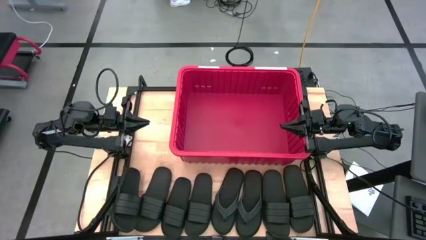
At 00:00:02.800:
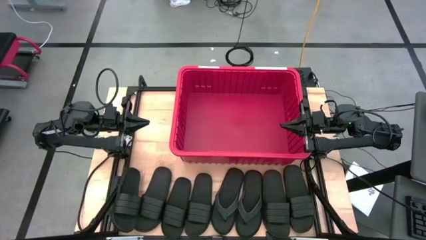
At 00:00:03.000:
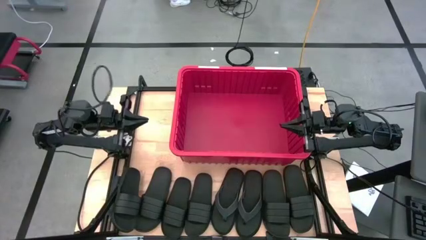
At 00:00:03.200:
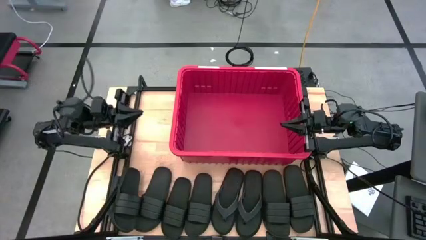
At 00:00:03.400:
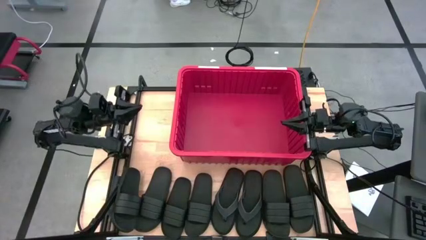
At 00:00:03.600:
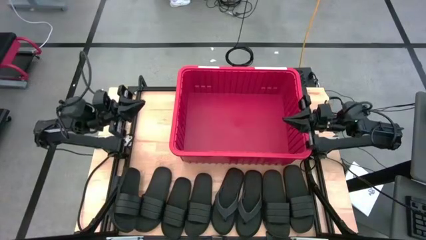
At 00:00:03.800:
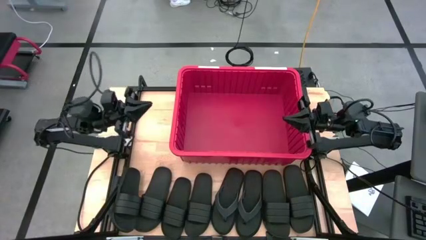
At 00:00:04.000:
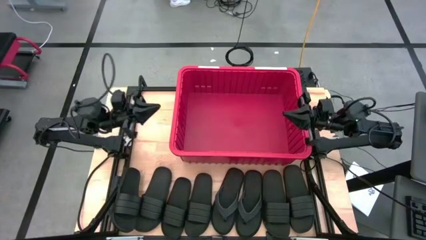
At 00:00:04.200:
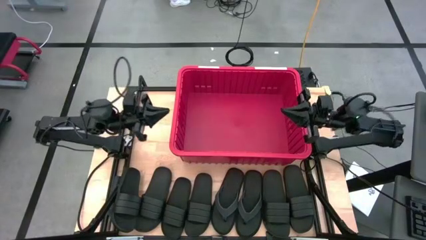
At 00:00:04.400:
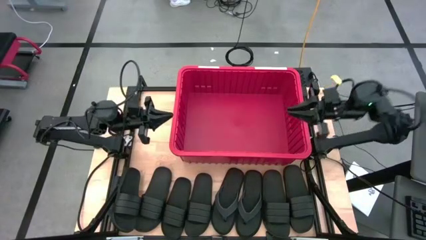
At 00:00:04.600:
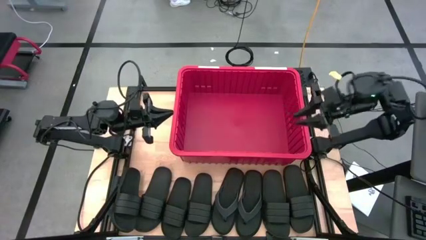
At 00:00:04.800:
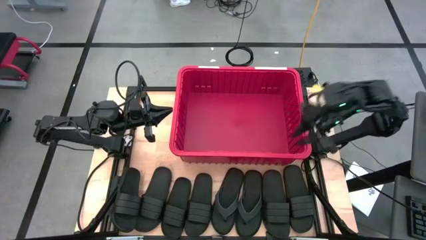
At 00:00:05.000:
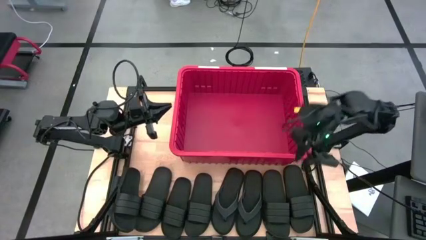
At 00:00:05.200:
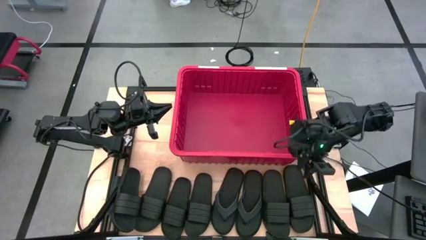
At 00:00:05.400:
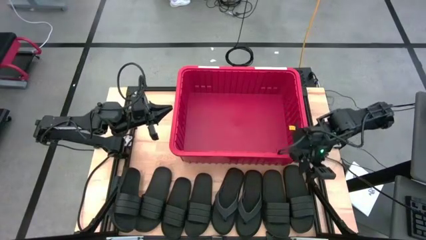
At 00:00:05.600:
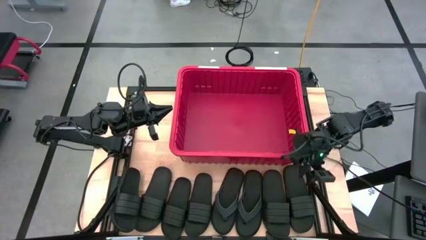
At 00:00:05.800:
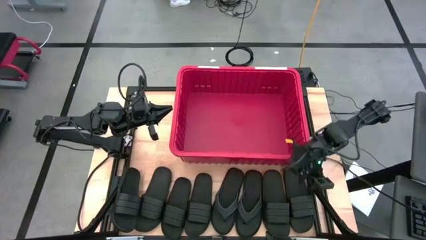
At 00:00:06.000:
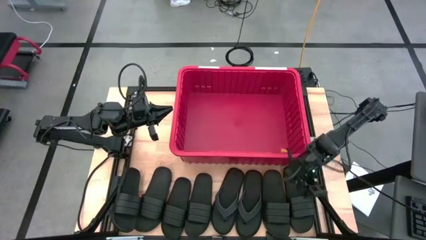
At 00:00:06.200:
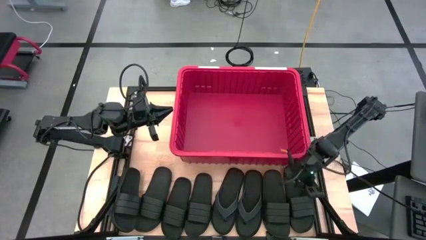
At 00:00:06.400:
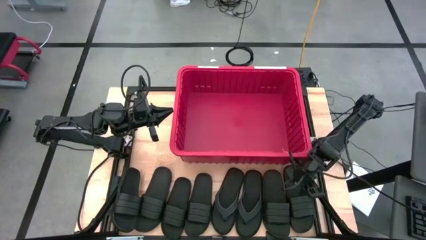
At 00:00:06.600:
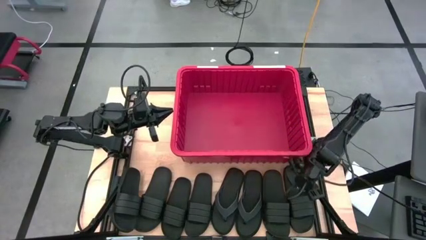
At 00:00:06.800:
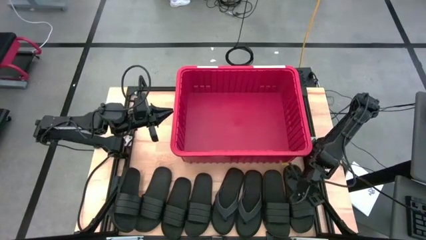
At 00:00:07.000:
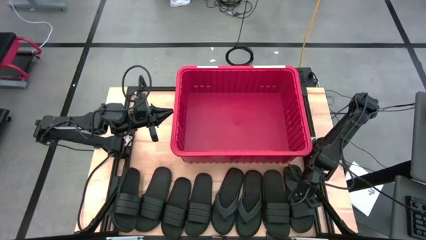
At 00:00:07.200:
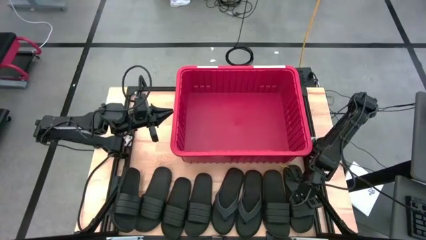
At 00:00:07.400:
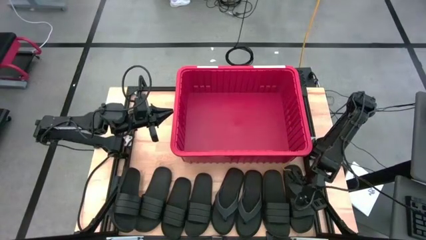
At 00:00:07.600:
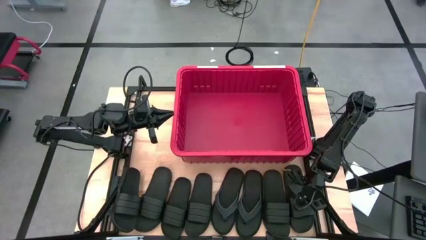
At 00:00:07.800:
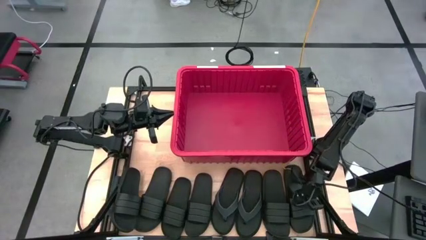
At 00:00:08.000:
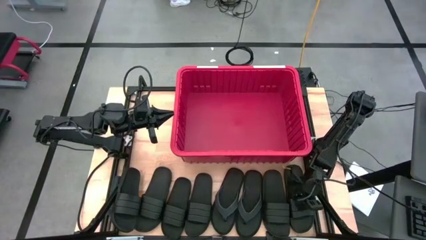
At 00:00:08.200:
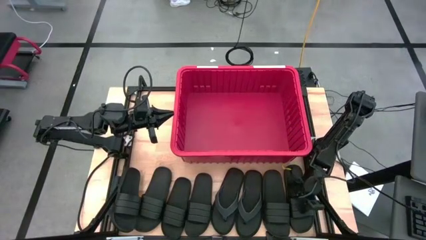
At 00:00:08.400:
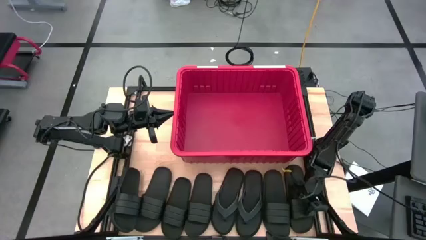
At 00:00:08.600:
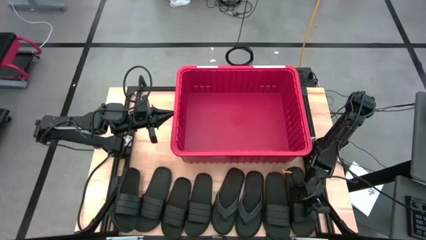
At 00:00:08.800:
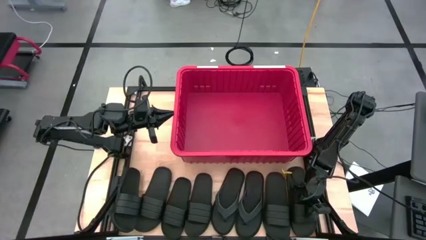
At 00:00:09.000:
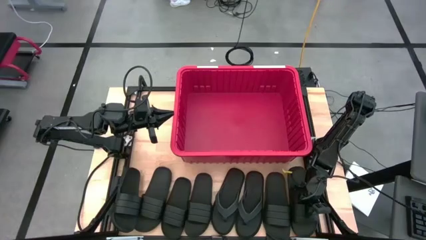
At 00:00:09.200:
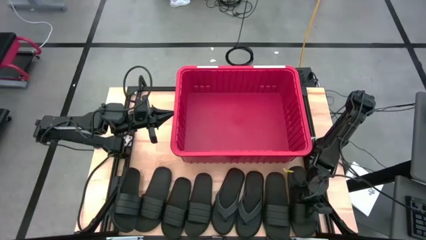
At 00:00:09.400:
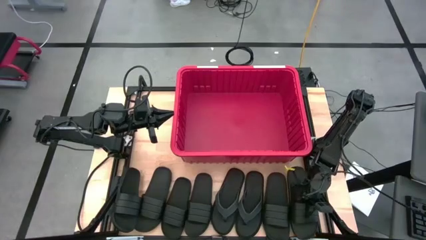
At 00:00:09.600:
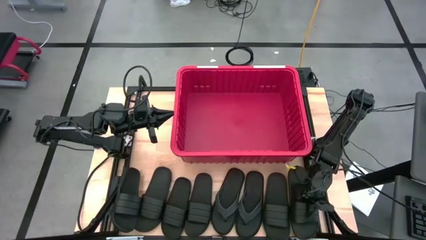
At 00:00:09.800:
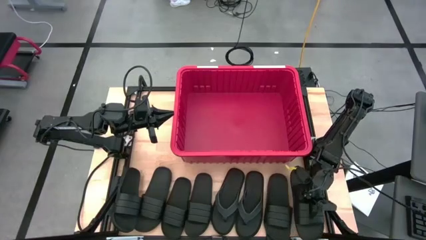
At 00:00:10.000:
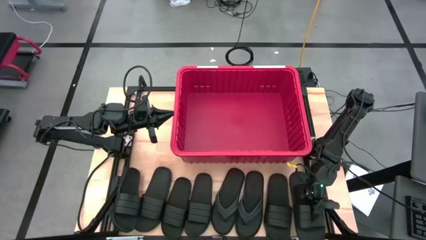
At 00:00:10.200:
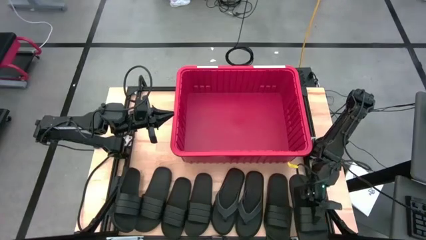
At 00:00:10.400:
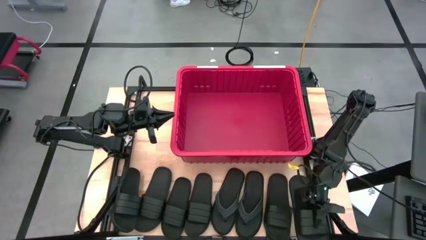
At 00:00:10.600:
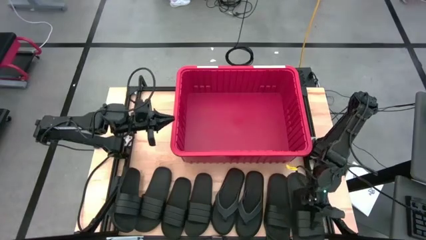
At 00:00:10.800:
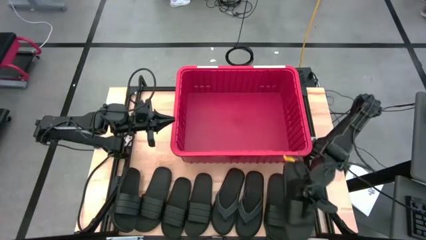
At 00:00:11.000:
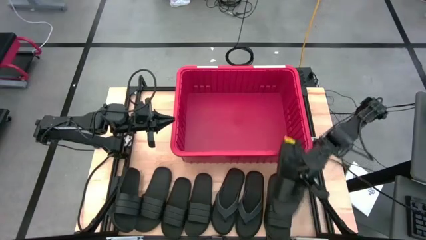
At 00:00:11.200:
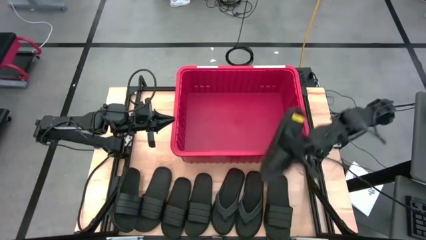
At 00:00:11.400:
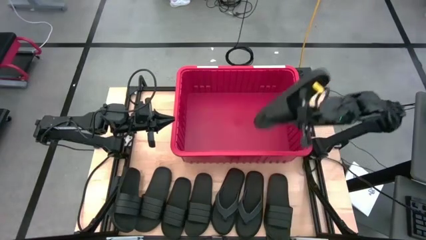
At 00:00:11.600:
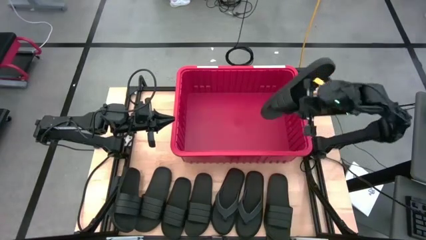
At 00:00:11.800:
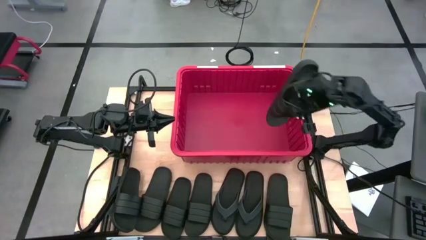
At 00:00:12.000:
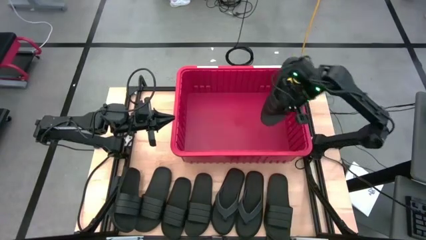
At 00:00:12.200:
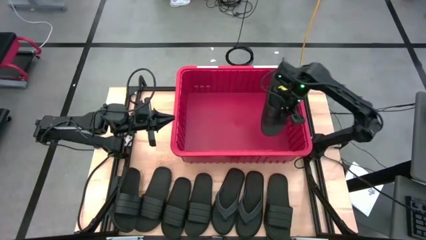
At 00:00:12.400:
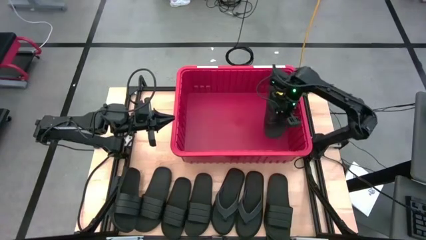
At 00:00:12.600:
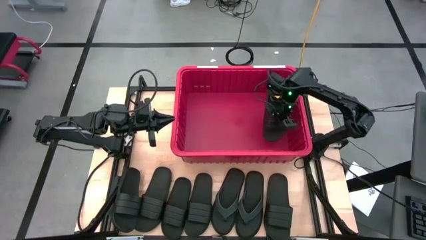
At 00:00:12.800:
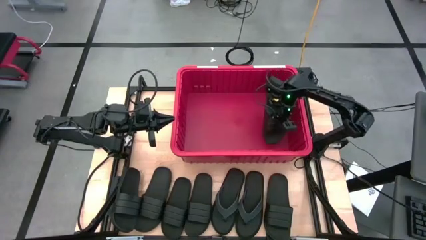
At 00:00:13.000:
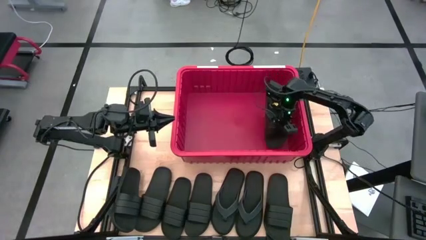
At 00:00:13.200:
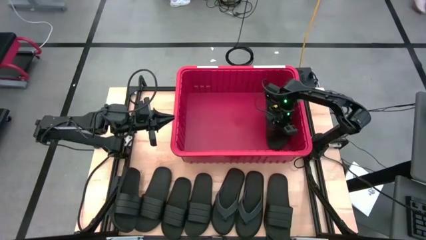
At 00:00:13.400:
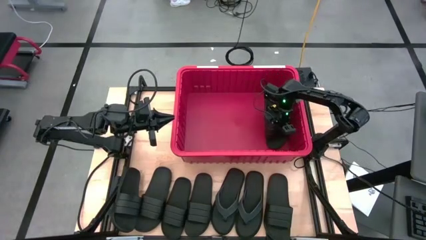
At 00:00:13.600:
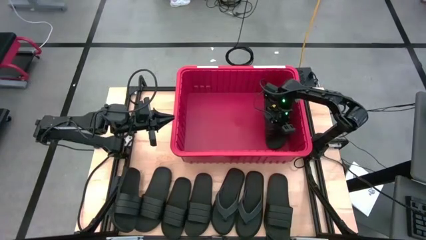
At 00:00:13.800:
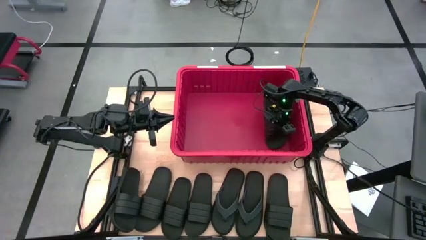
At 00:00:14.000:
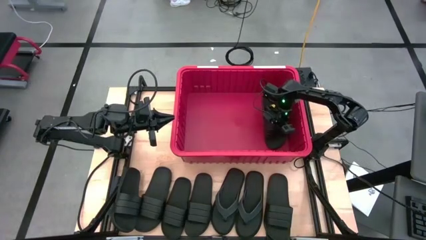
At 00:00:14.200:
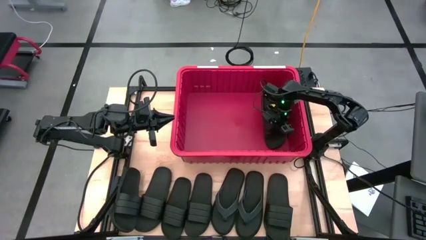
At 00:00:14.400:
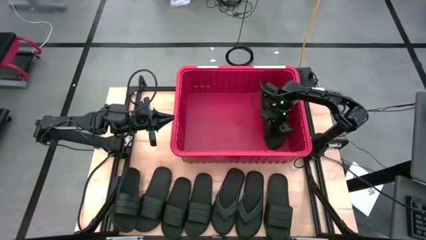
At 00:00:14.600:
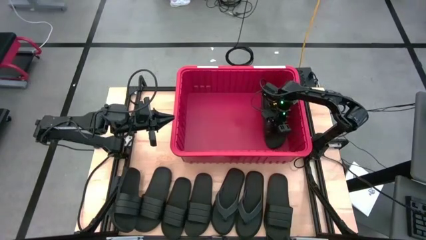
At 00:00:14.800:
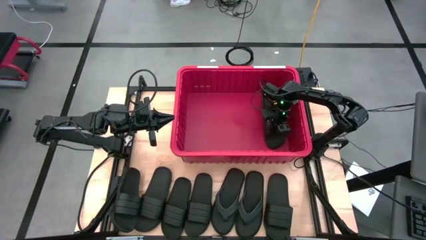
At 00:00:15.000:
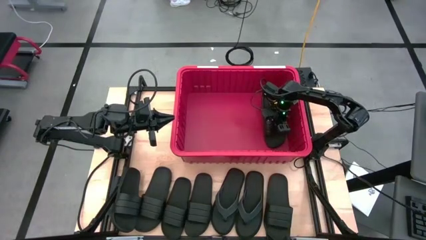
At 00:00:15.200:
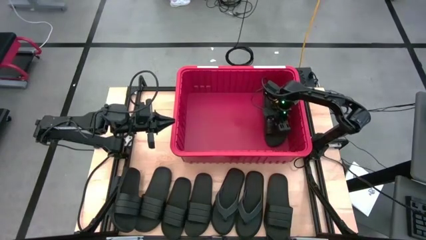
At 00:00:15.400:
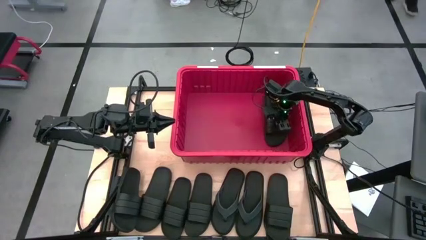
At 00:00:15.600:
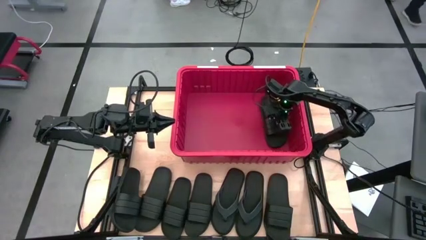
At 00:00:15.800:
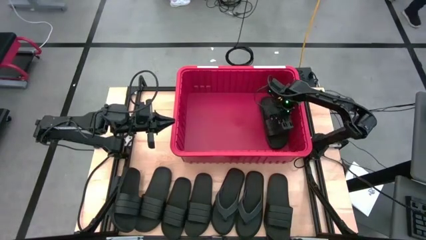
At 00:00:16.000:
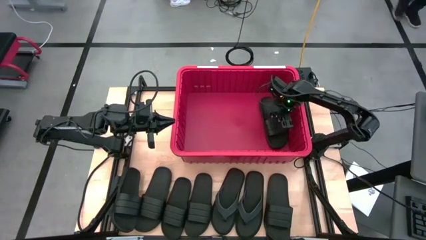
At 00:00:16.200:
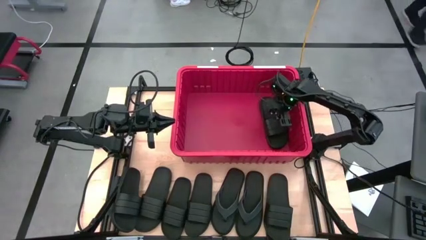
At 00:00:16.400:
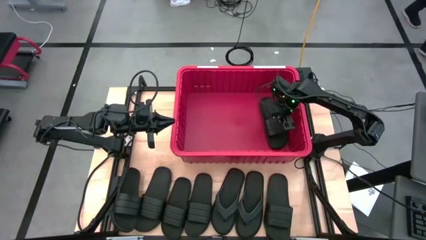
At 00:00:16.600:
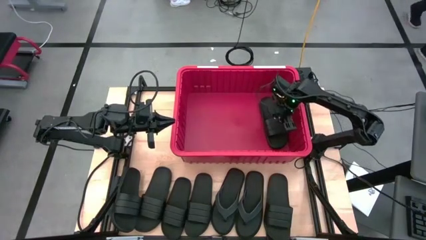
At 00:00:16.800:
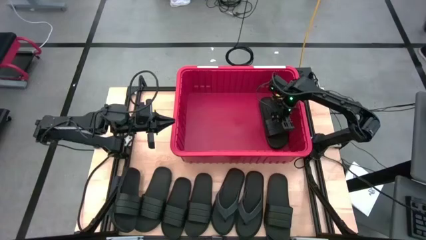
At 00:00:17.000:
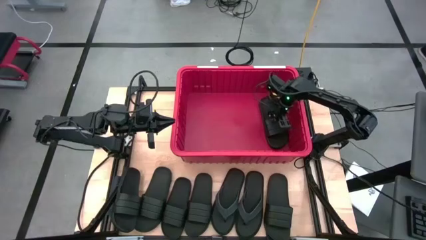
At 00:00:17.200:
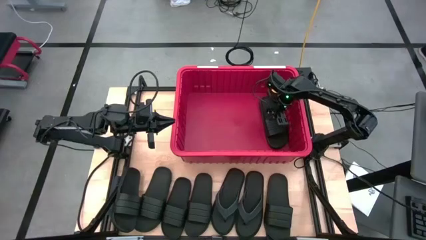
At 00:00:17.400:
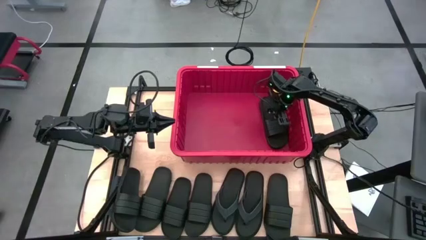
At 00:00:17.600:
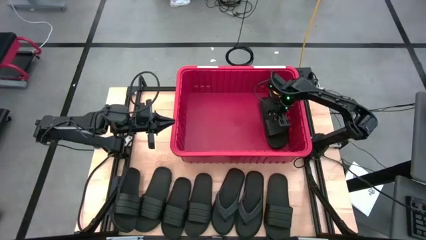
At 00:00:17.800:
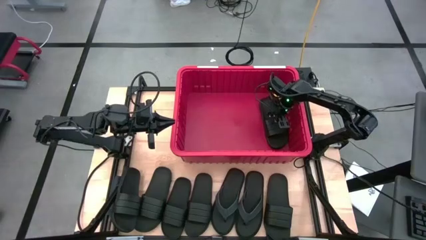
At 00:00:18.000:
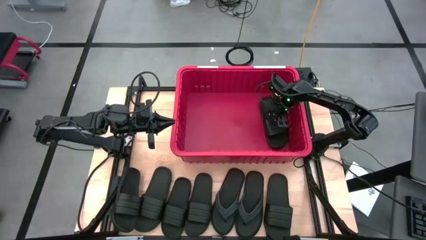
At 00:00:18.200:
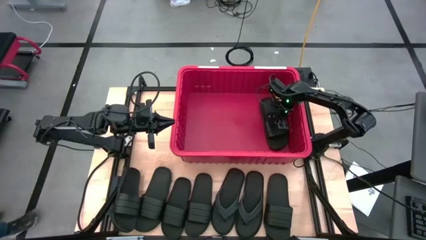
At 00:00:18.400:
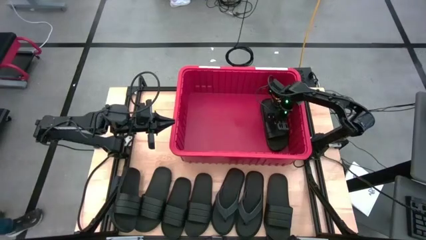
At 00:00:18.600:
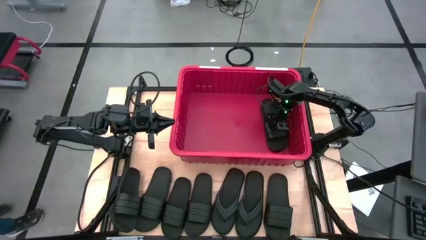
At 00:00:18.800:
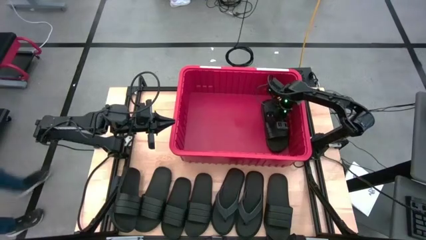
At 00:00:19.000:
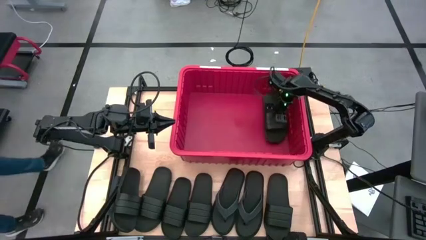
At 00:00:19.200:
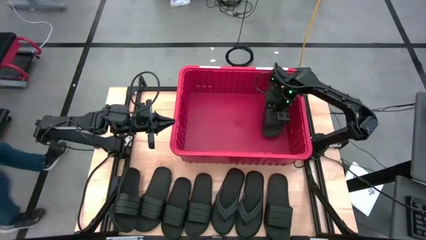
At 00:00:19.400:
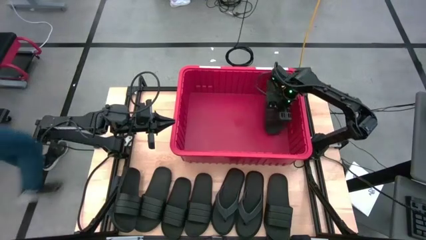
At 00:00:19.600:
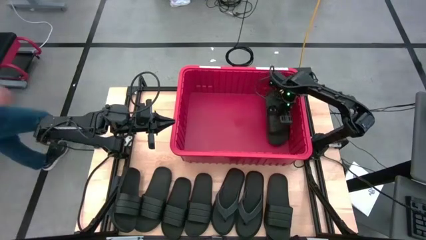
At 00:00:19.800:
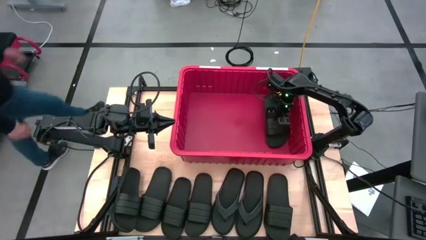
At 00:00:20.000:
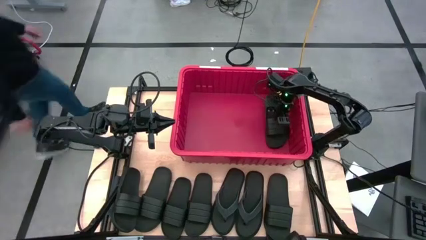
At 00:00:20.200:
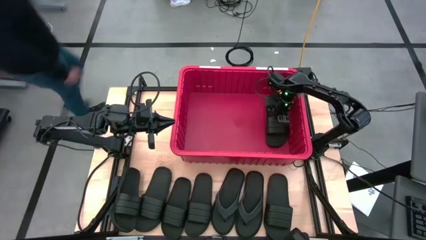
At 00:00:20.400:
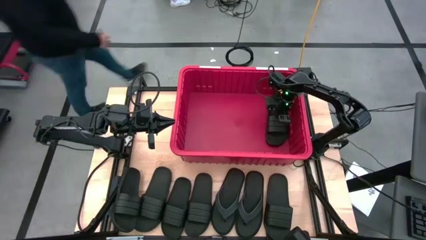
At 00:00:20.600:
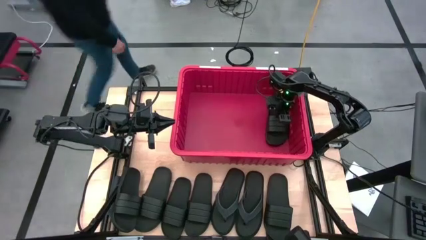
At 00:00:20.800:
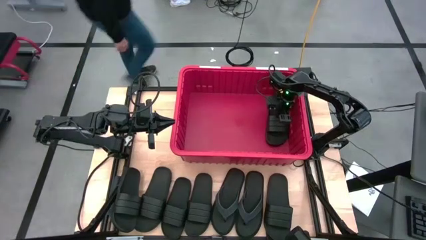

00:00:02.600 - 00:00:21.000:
Task: Pick and place slides into bin
Put the black slide into the red container
